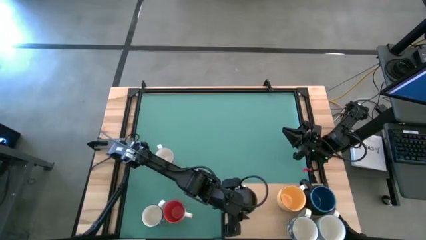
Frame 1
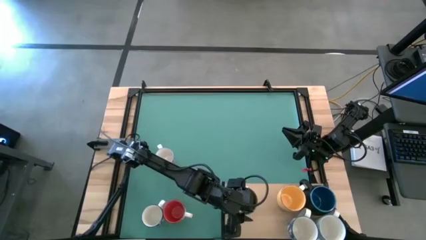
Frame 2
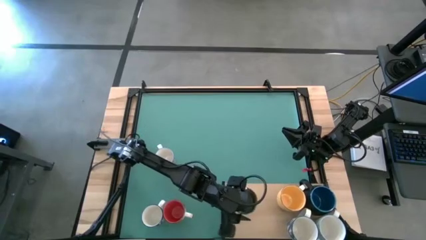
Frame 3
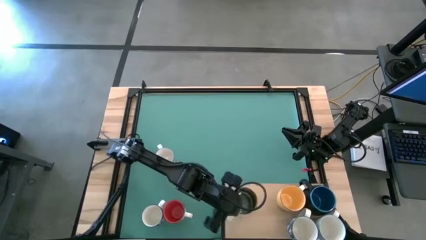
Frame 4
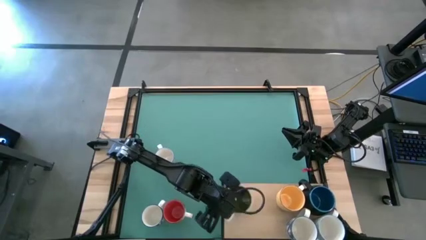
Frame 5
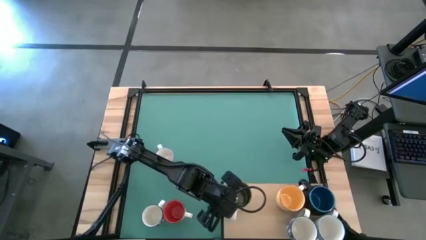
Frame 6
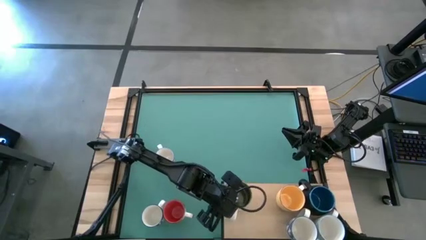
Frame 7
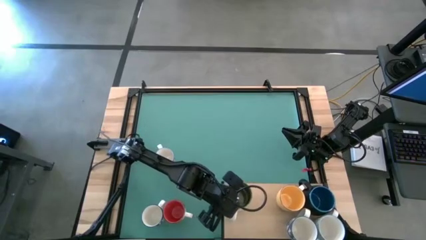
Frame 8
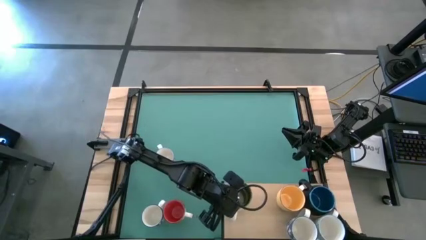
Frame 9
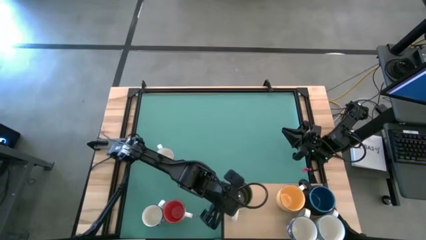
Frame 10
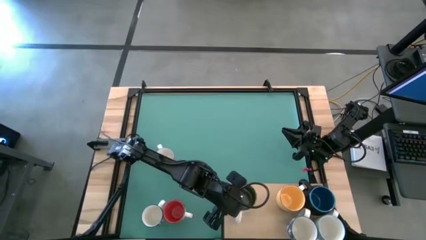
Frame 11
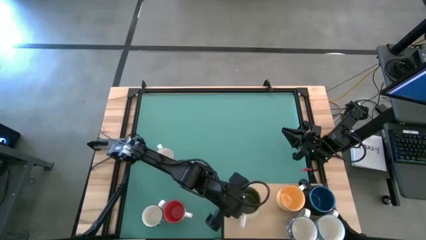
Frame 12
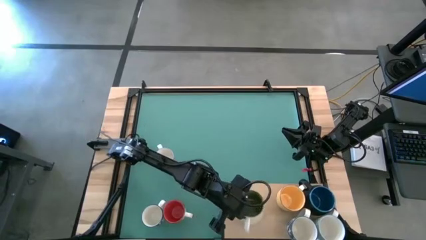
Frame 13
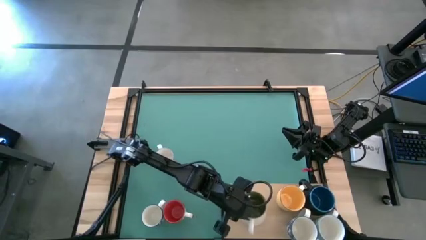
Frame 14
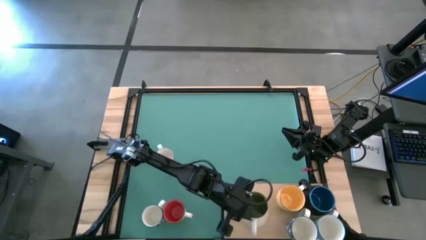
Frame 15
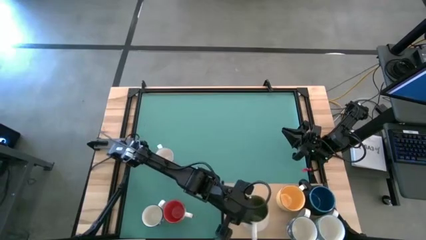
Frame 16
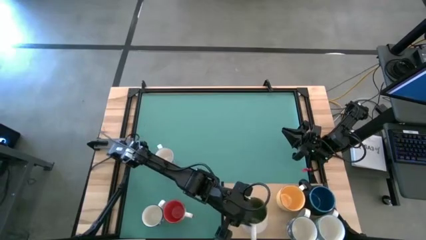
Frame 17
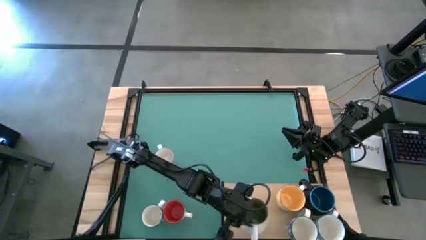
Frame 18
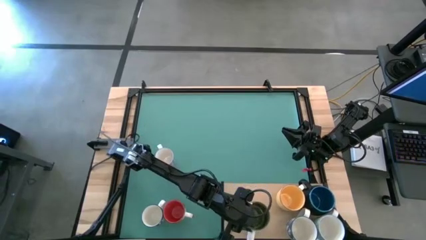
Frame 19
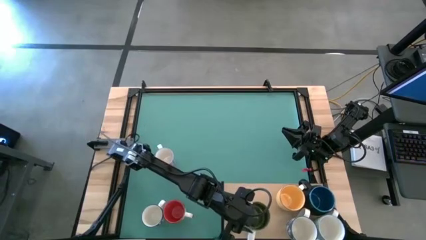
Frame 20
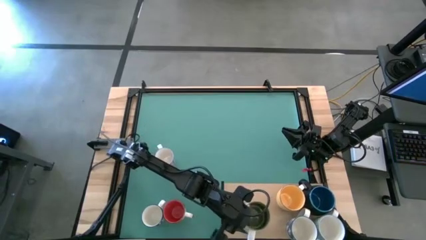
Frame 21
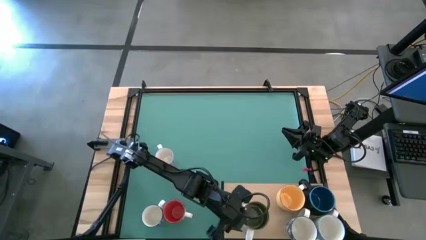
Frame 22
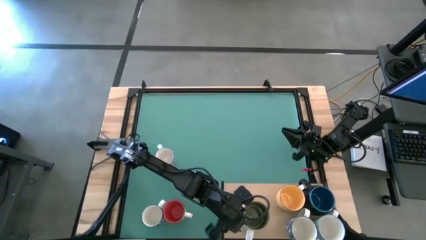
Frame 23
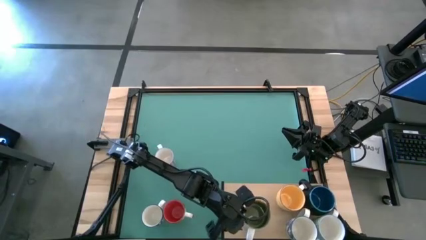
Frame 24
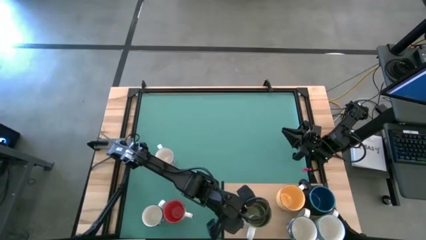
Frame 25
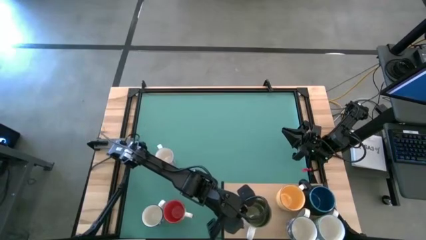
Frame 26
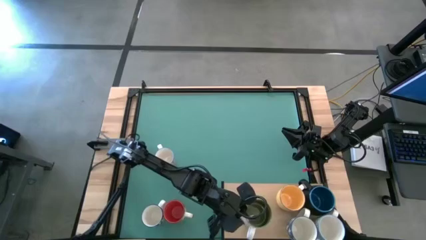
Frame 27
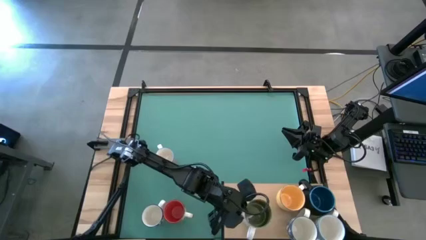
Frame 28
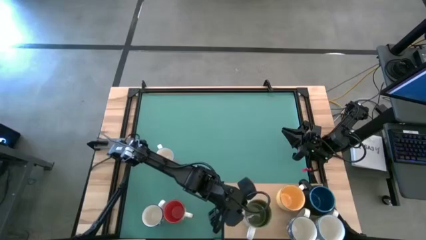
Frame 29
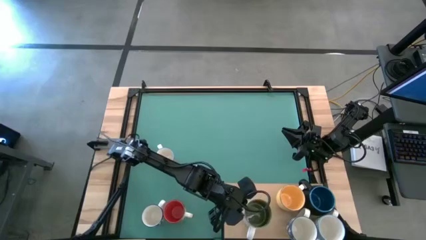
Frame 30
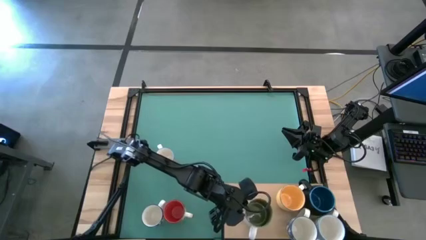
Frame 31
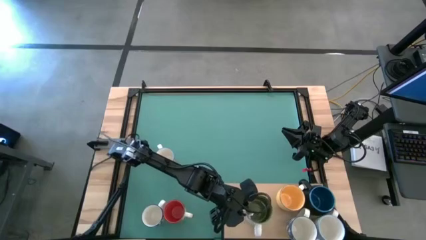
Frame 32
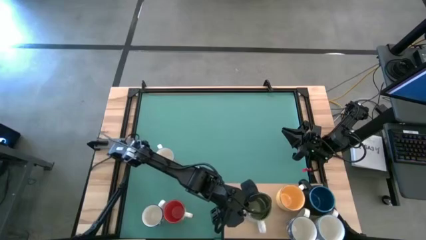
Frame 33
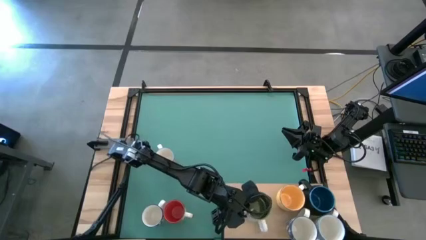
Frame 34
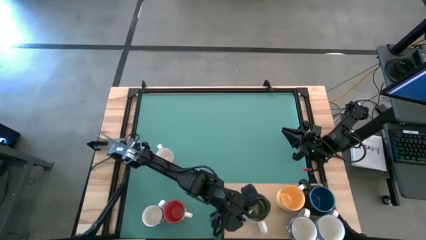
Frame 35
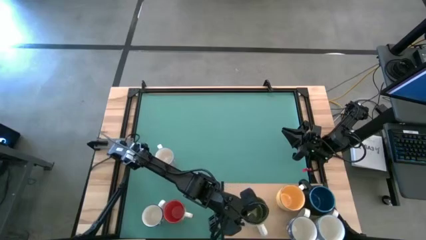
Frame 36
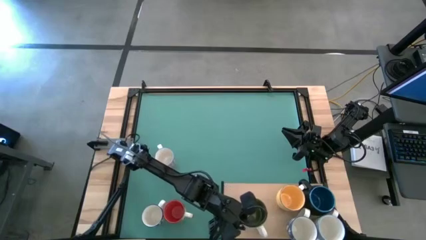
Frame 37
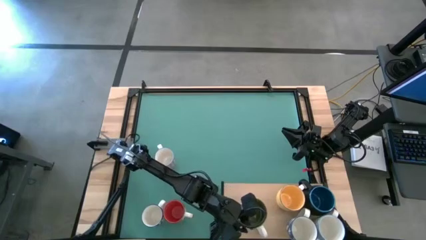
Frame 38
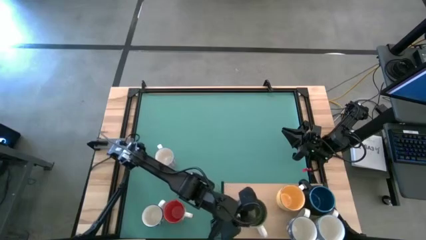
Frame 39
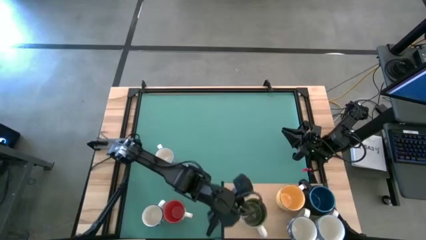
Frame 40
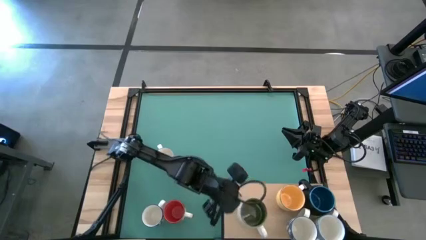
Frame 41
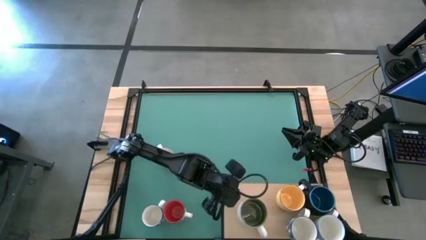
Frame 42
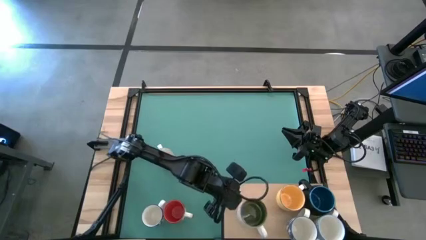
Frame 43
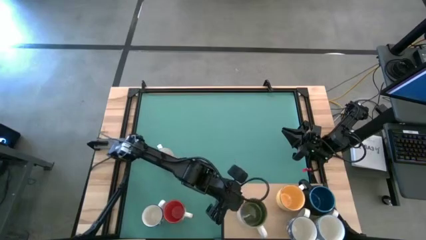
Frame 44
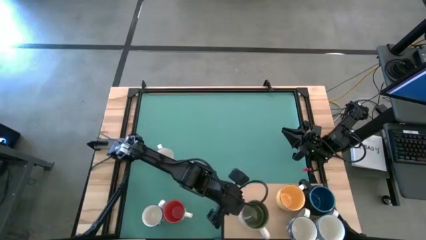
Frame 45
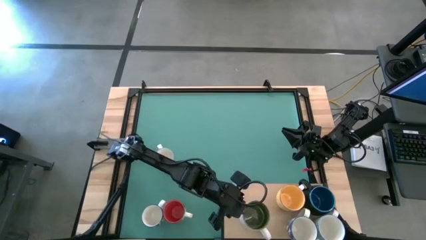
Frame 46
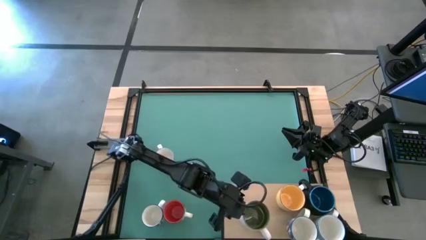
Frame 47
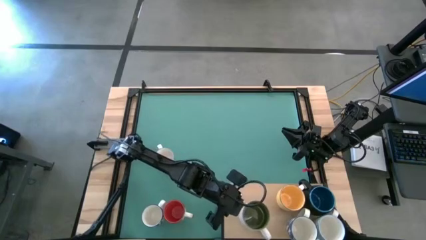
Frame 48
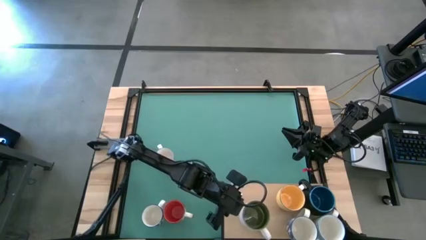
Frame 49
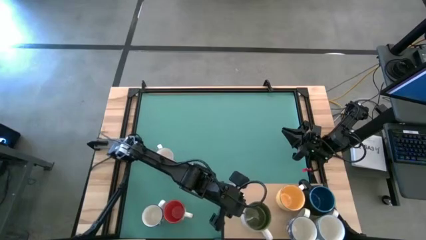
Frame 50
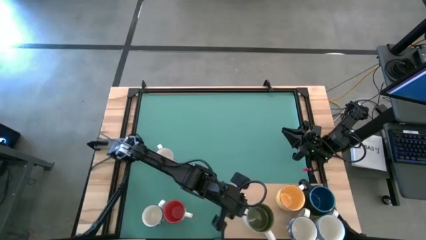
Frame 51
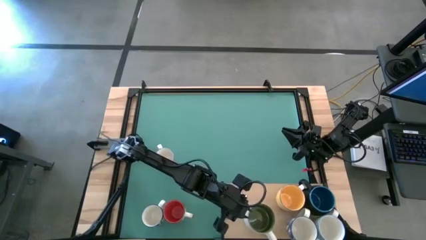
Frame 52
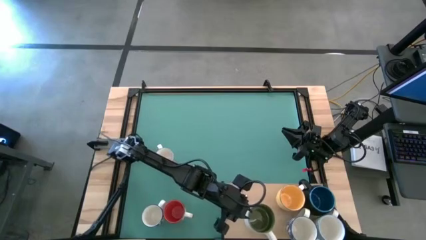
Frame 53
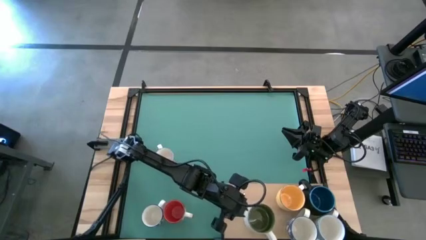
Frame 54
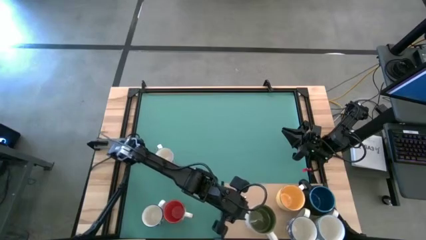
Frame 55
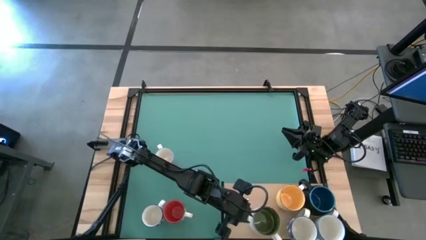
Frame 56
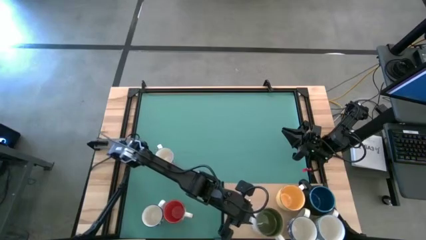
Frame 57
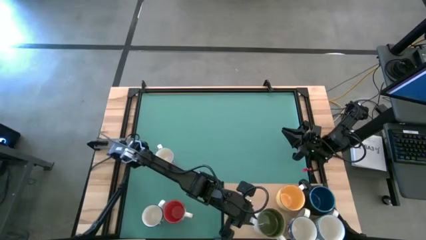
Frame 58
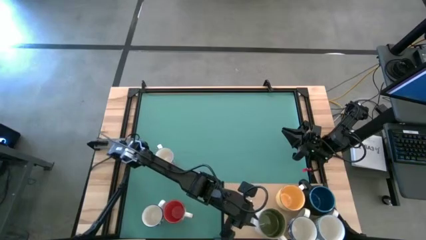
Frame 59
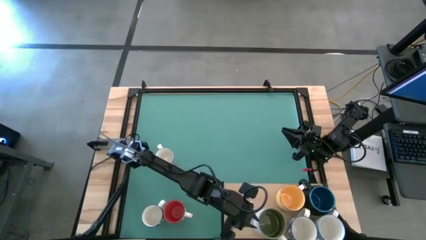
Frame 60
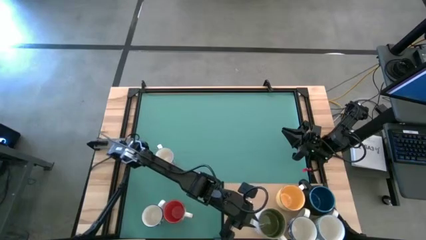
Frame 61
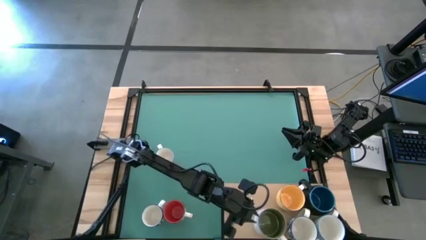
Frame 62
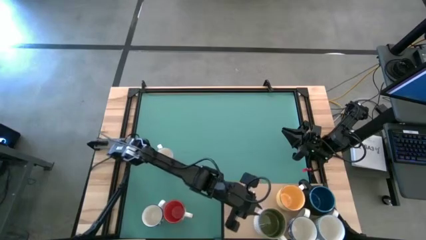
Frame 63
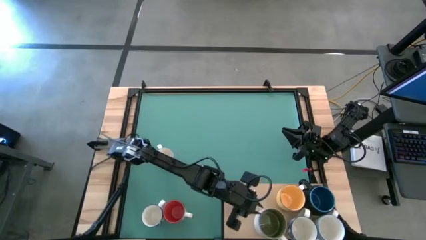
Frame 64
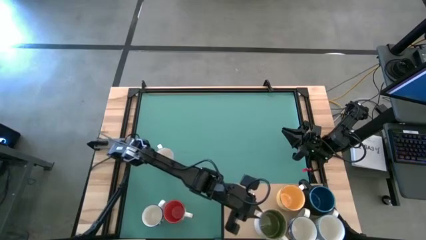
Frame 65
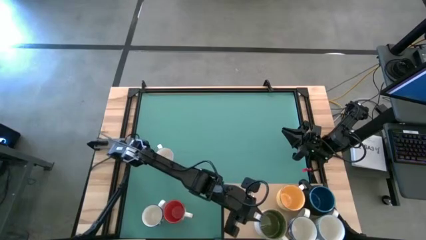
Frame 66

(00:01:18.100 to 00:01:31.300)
Task: Place coffee mugs
Put the green mug on the shelf
